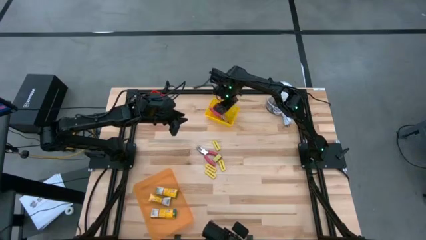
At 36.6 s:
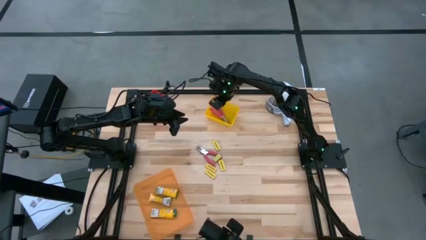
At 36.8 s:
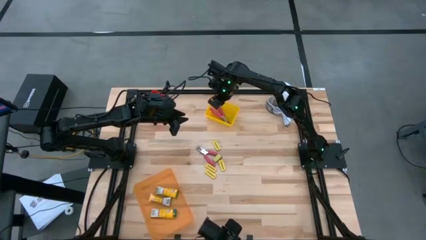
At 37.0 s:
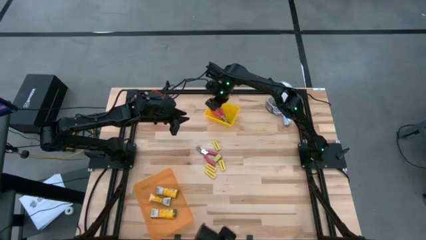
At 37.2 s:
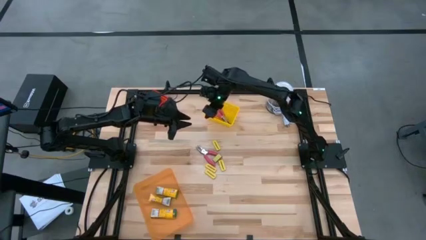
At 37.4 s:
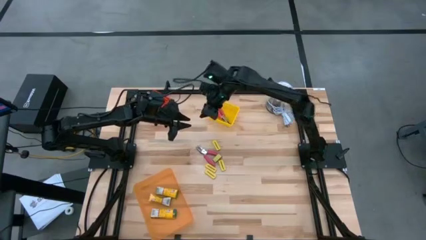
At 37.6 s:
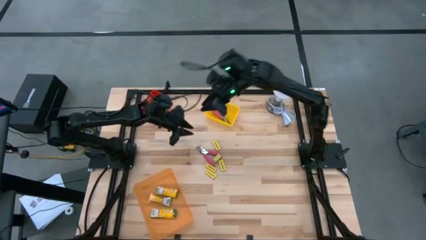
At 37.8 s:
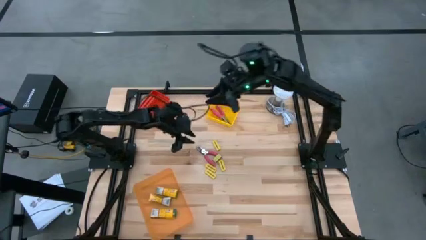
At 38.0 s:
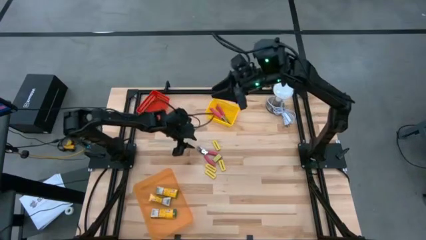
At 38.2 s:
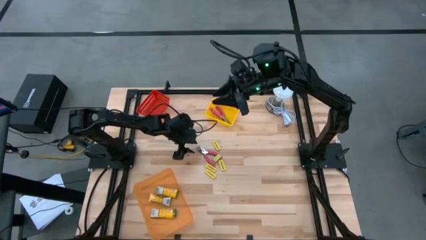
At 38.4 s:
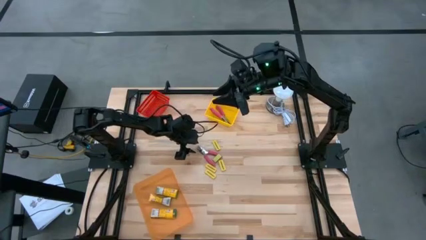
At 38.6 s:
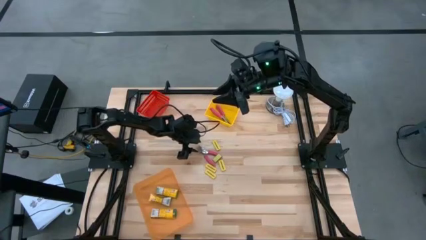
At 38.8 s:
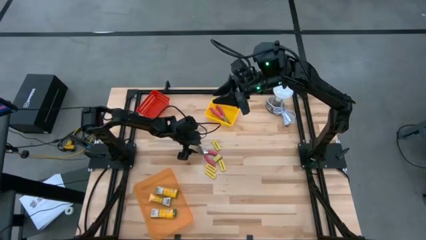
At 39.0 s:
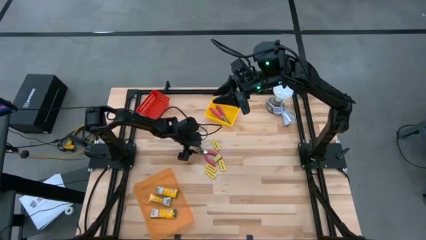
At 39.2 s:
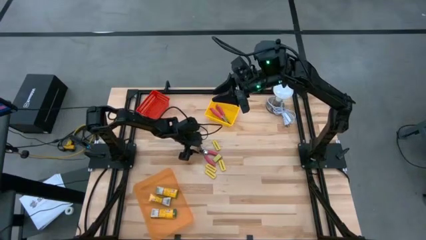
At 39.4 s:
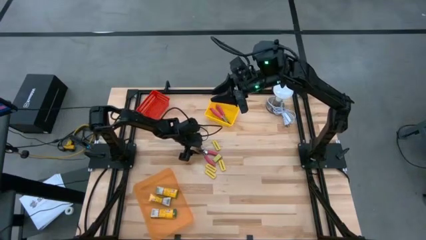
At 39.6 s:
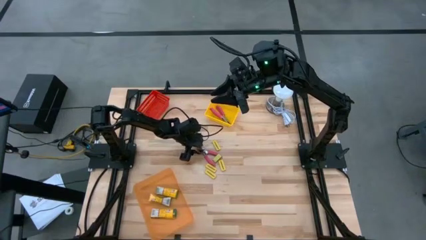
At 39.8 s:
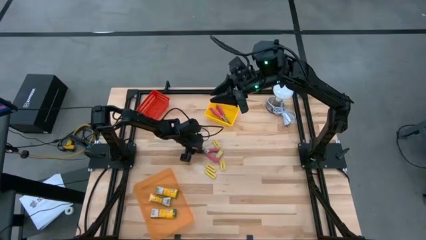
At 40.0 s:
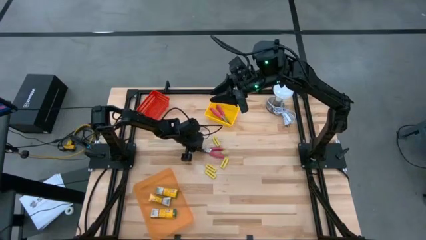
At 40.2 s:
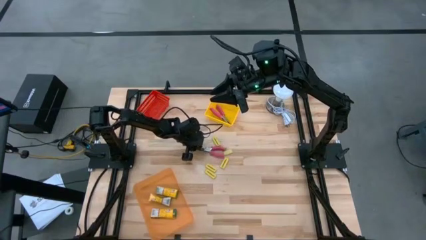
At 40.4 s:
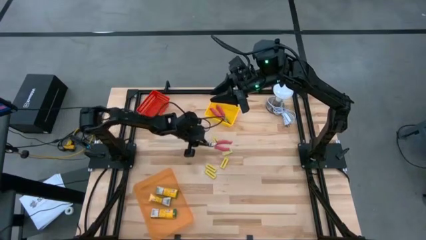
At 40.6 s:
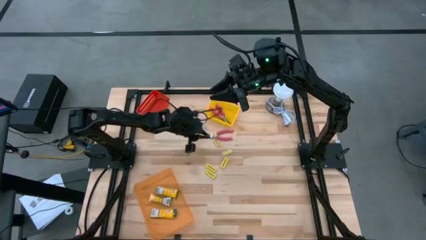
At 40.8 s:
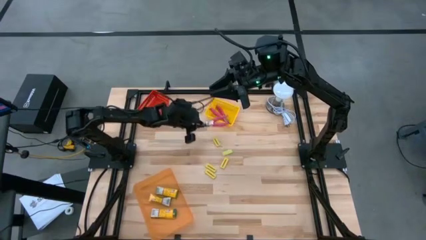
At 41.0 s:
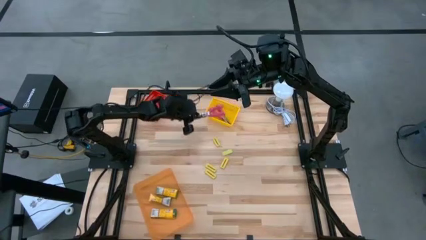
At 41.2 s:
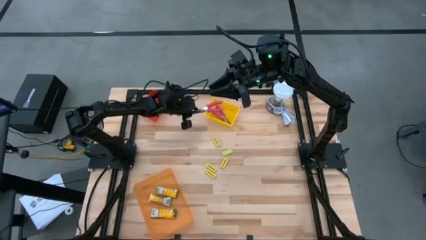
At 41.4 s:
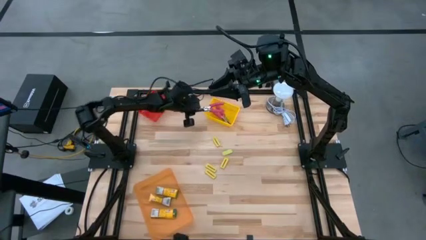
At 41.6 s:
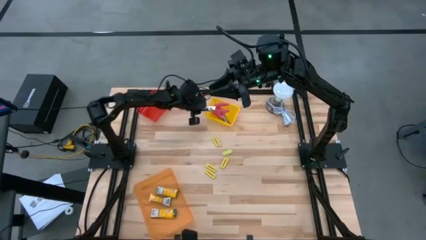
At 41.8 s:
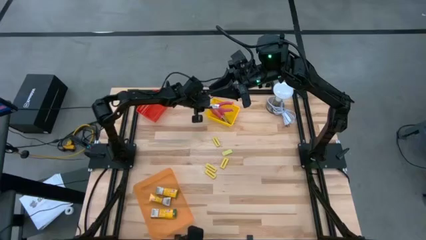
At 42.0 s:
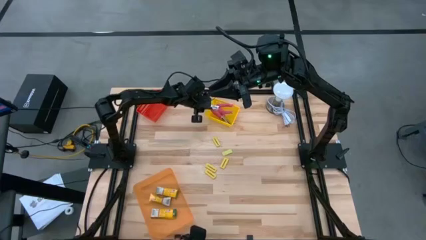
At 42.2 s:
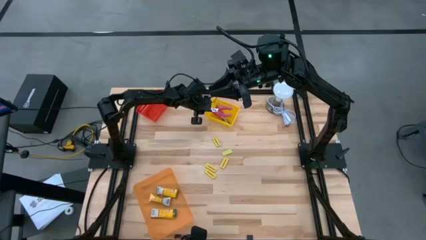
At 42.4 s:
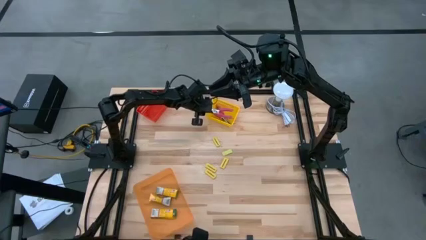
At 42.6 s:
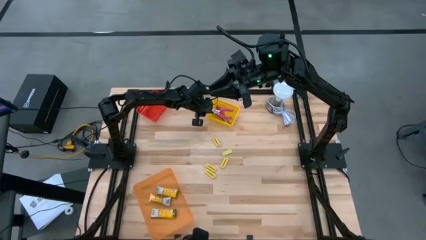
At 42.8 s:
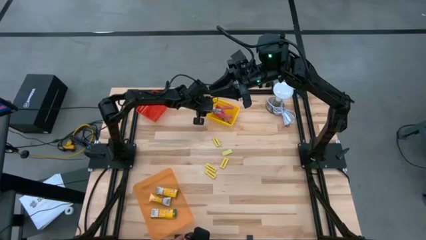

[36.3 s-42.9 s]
Task: Pick & Place School Supplies
Put the pink hole puncher into the yellow bin

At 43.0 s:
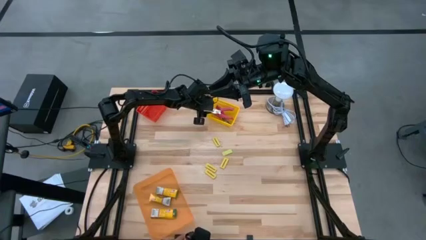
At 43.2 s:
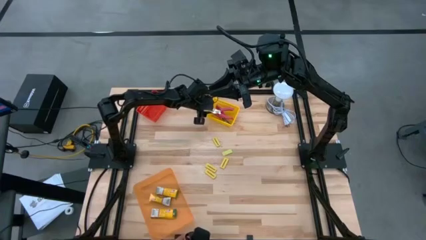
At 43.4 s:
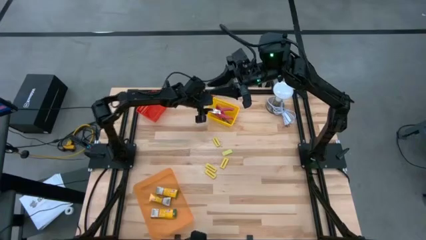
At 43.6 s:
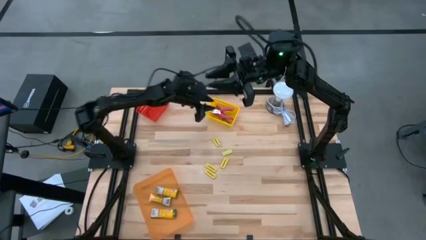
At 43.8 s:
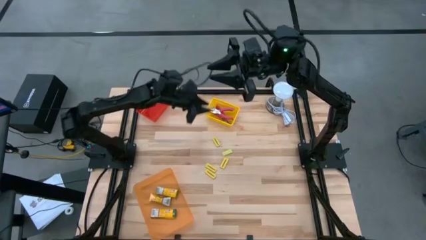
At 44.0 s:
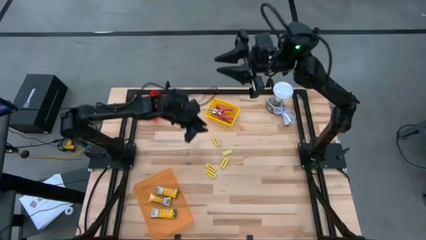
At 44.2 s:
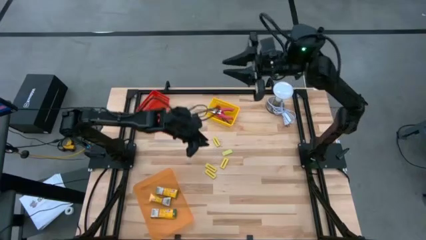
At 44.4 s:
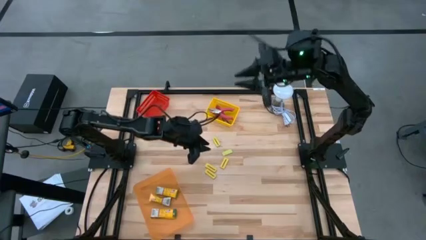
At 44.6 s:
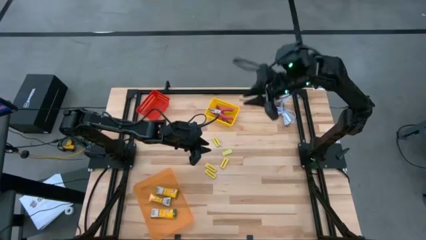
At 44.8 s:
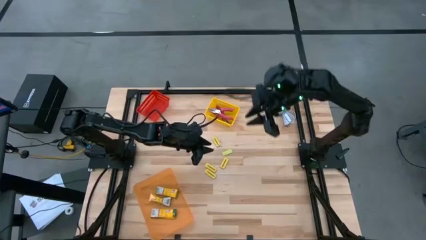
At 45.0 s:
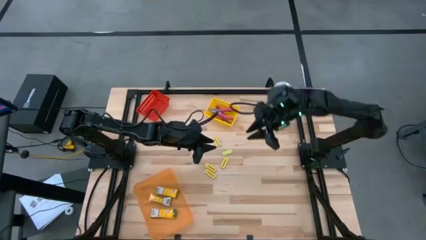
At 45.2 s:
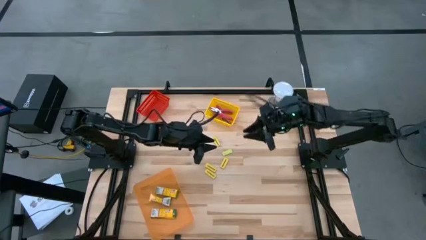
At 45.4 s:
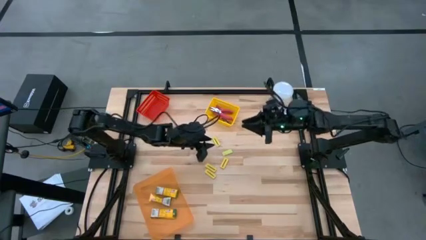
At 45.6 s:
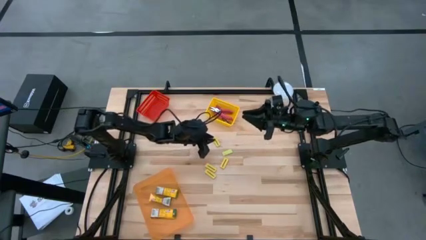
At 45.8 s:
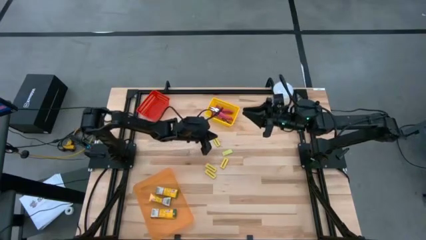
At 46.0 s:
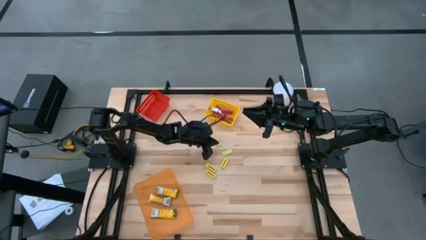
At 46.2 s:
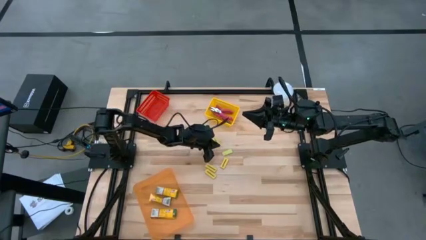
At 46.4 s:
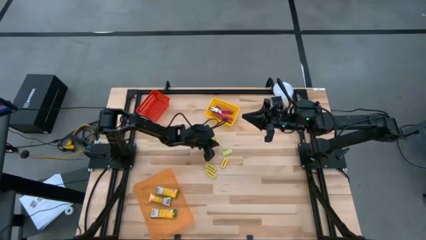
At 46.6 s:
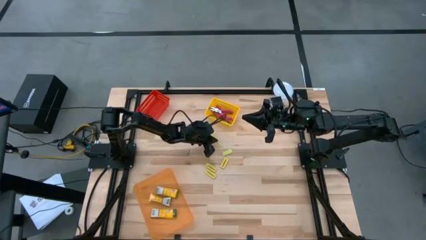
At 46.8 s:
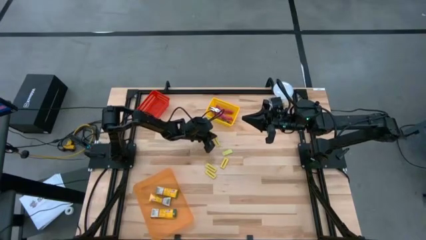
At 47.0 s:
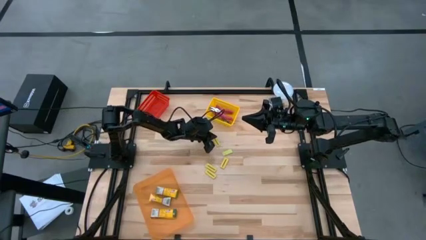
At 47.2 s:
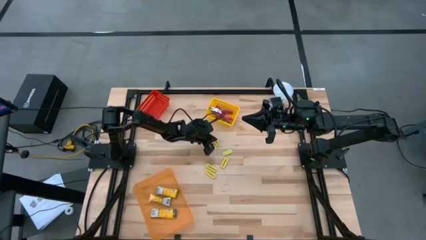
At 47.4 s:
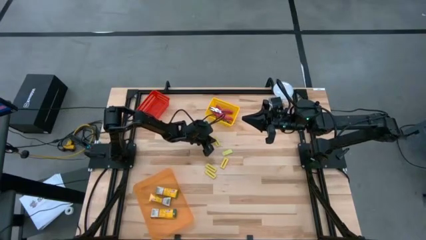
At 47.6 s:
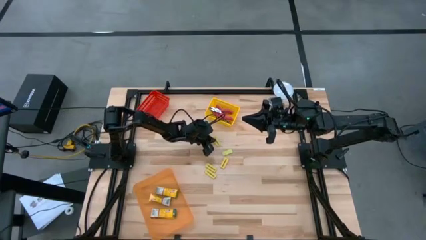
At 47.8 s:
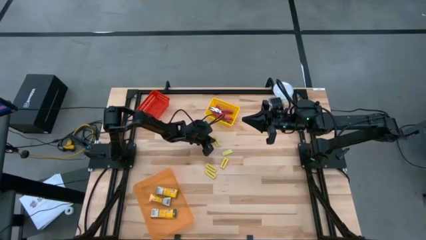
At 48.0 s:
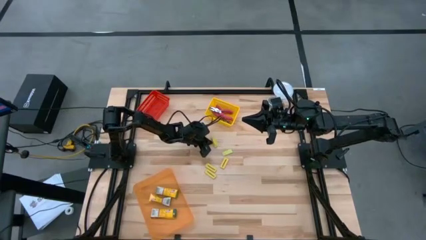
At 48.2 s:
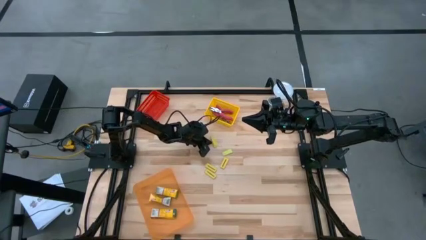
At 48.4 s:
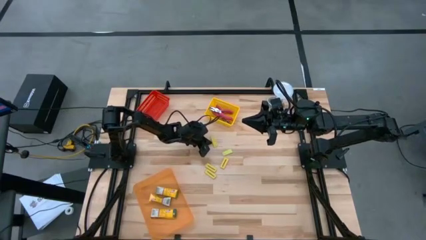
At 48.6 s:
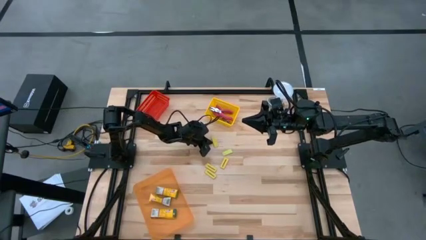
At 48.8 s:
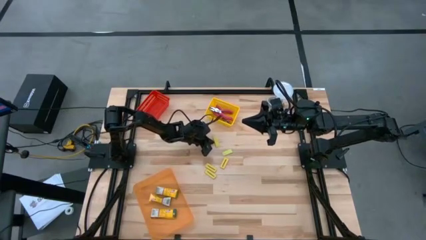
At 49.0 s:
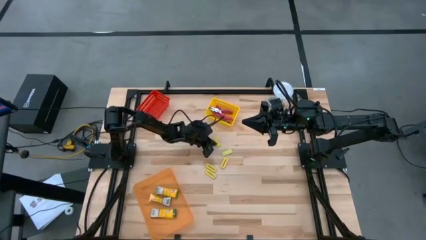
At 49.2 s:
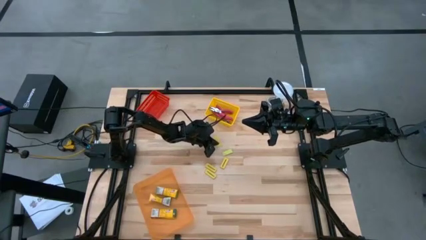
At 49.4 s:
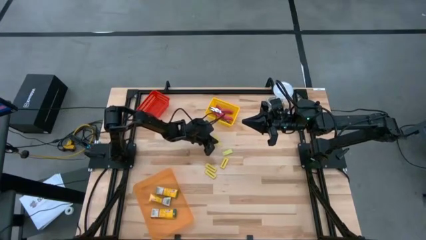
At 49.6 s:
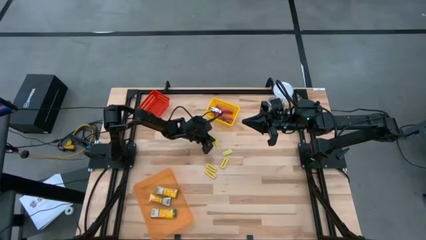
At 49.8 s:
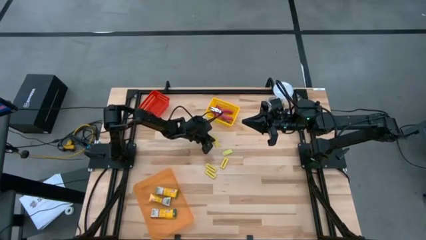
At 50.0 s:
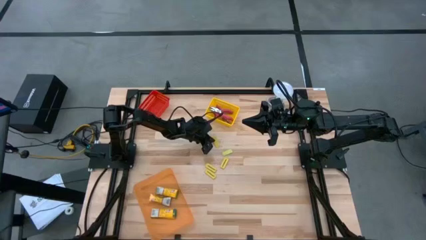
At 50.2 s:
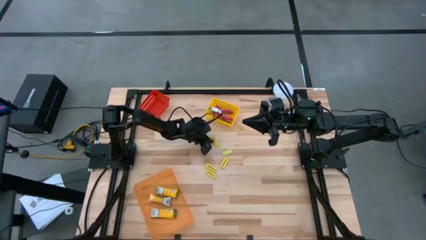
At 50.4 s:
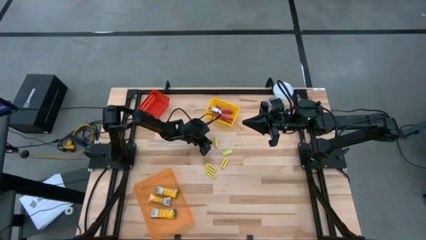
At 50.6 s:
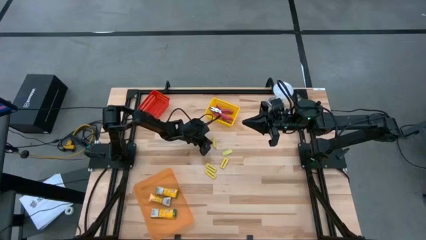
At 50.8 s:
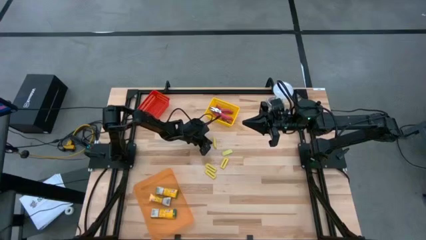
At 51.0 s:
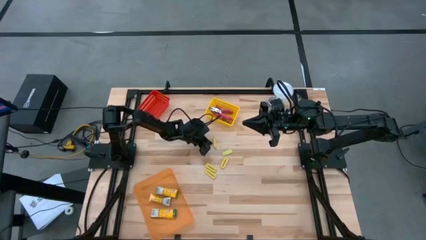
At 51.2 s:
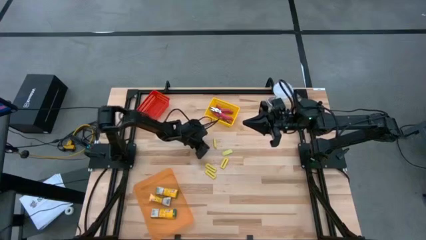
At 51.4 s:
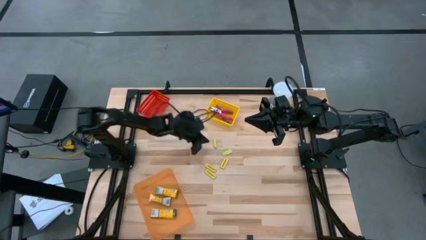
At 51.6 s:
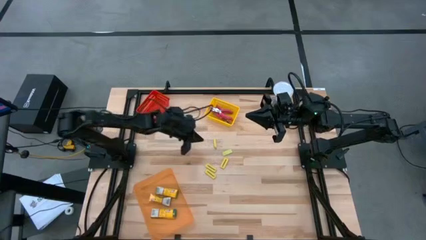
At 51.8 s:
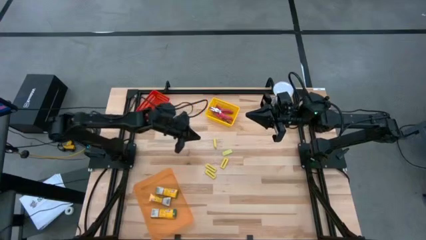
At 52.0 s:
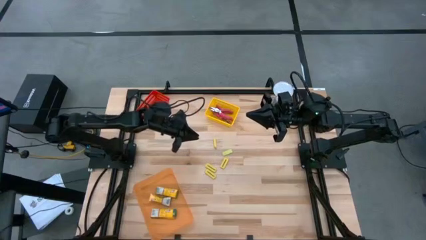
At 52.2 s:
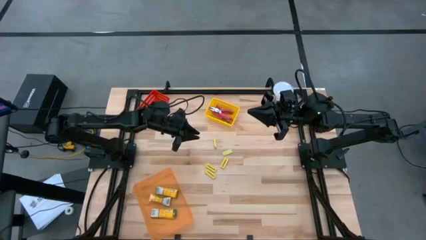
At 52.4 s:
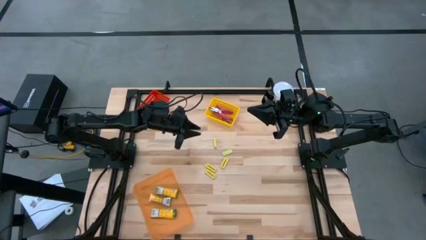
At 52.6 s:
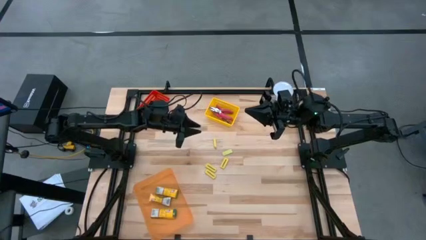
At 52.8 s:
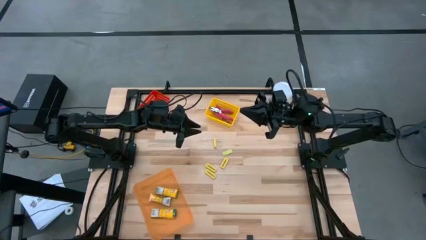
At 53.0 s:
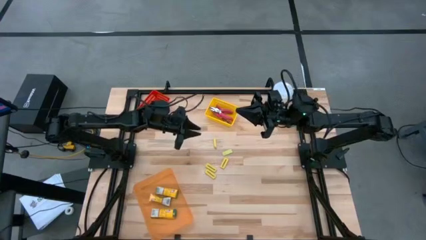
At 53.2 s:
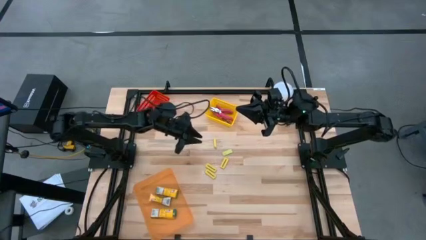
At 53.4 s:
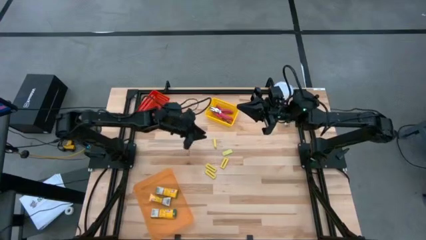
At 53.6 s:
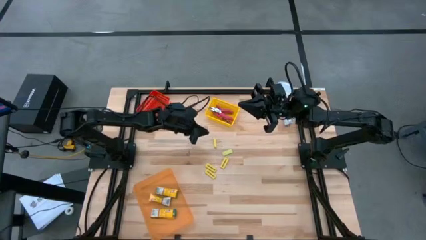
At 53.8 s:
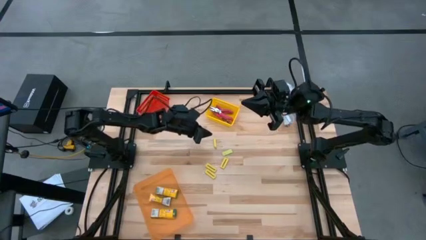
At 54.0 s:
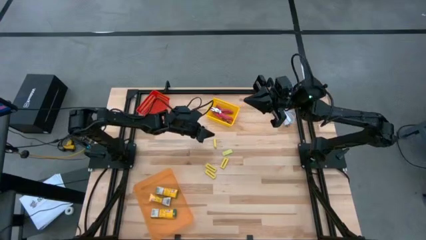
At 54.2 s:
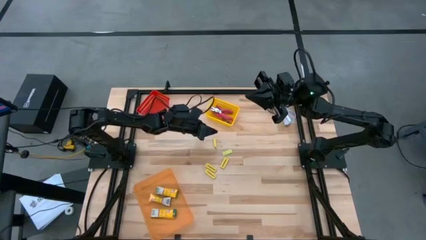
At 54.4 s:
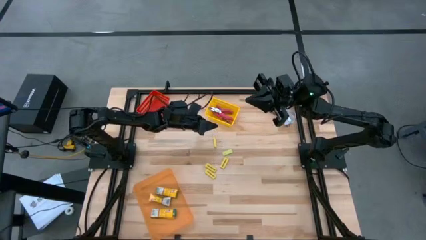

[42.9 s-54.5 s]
Put the yellow eraser into the red bin
